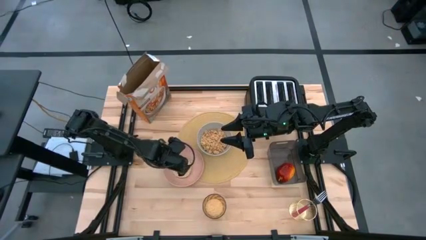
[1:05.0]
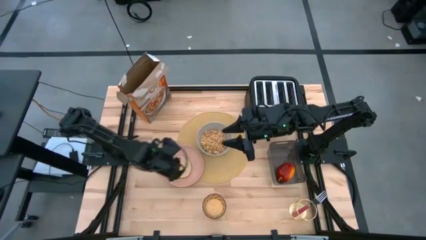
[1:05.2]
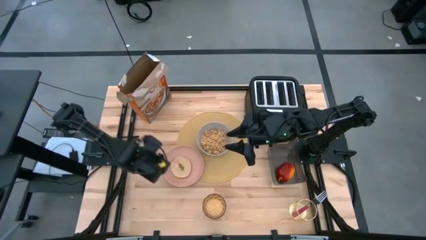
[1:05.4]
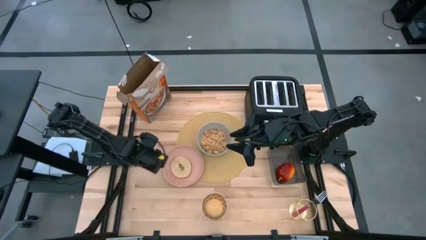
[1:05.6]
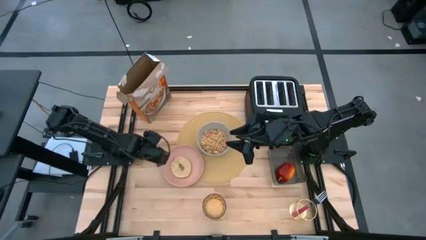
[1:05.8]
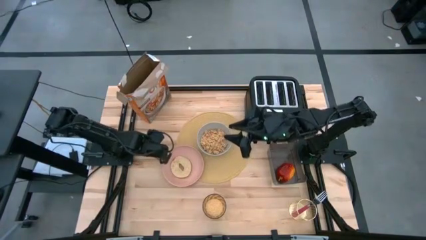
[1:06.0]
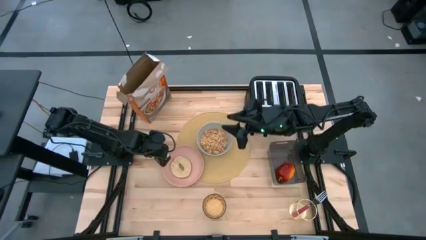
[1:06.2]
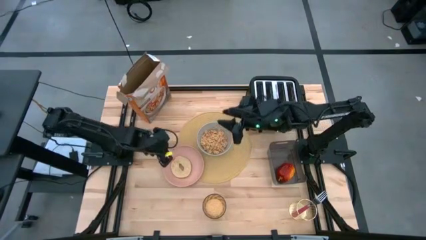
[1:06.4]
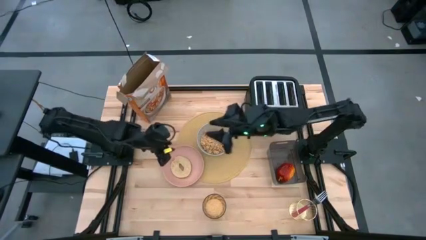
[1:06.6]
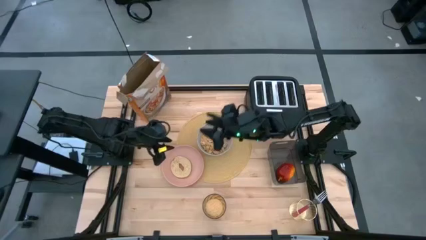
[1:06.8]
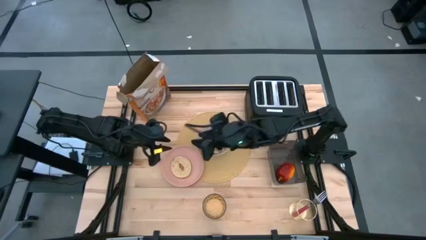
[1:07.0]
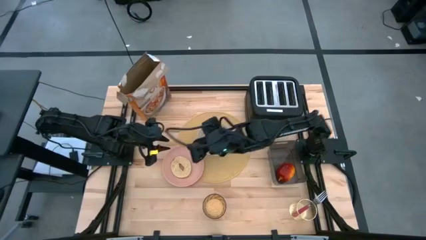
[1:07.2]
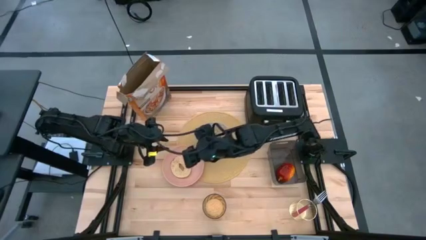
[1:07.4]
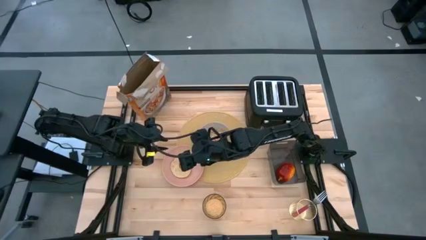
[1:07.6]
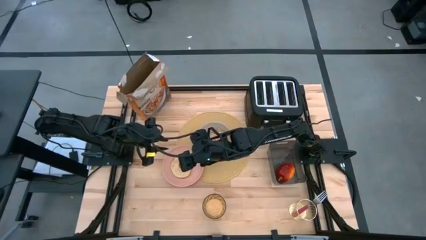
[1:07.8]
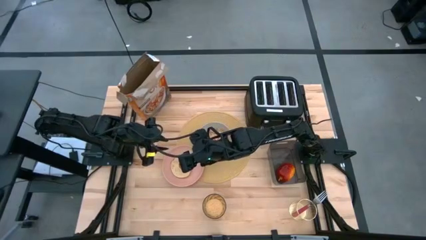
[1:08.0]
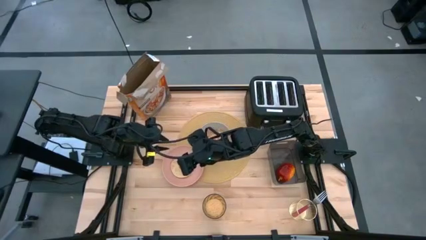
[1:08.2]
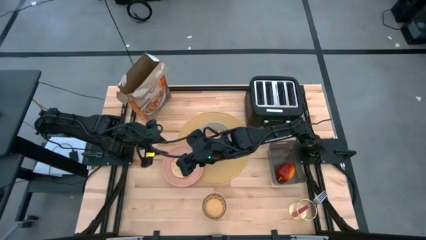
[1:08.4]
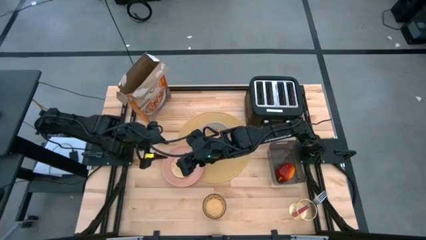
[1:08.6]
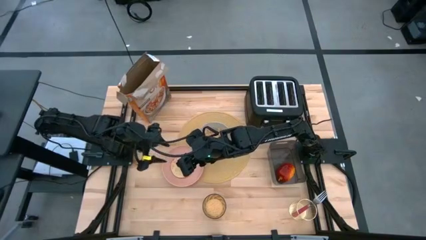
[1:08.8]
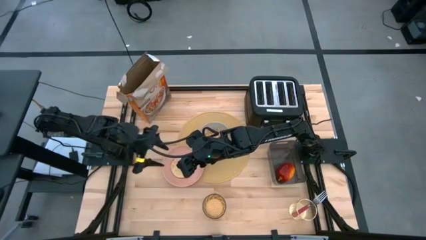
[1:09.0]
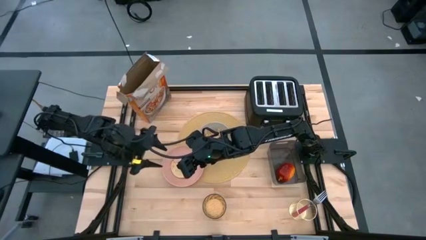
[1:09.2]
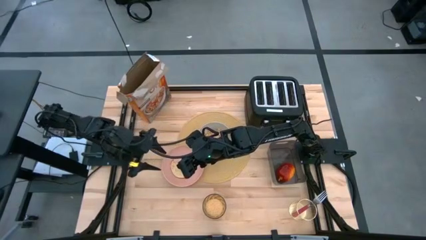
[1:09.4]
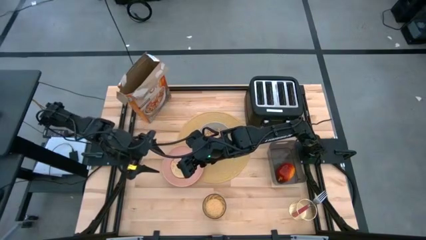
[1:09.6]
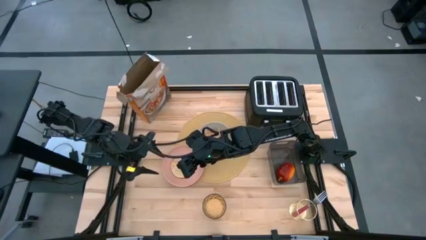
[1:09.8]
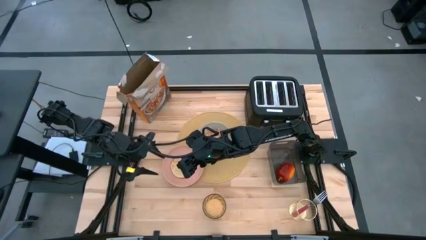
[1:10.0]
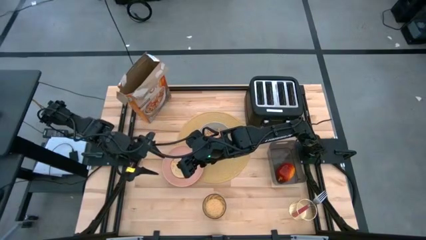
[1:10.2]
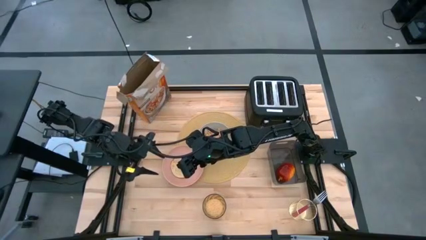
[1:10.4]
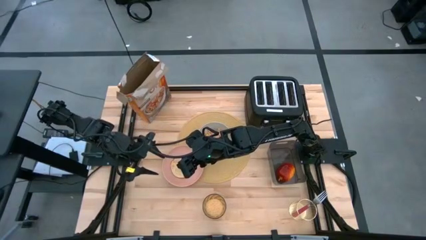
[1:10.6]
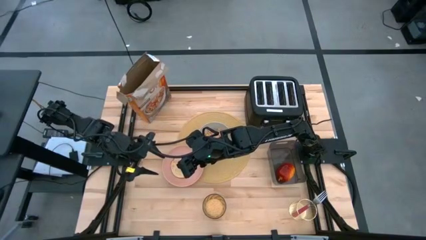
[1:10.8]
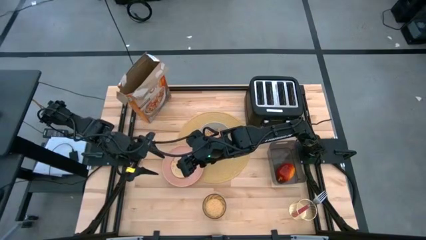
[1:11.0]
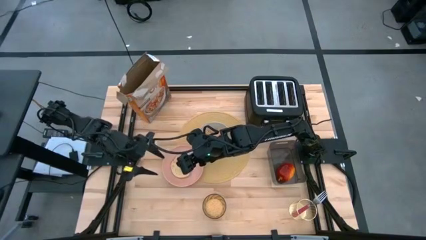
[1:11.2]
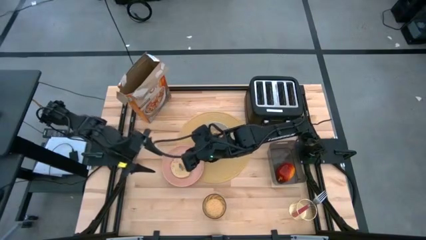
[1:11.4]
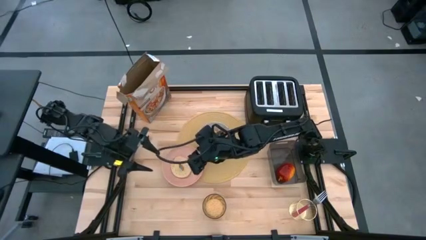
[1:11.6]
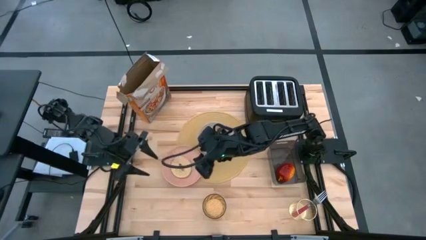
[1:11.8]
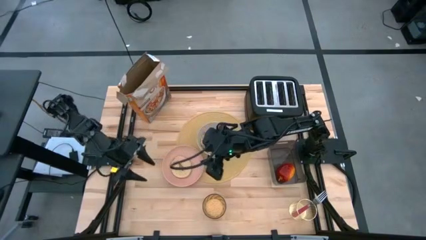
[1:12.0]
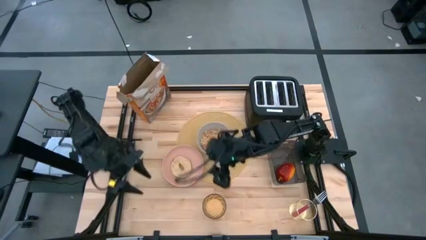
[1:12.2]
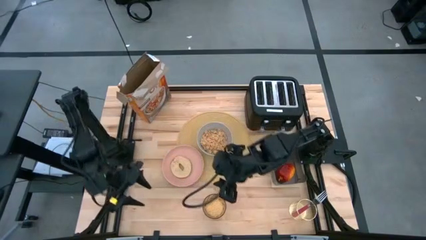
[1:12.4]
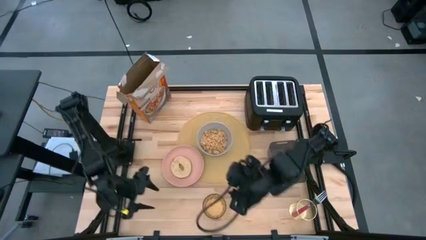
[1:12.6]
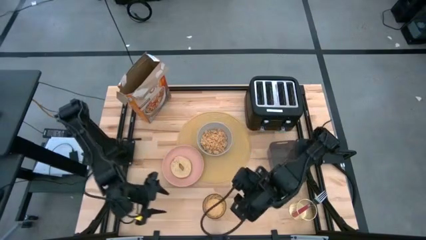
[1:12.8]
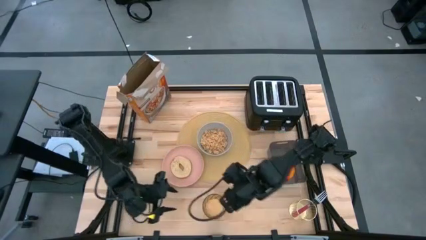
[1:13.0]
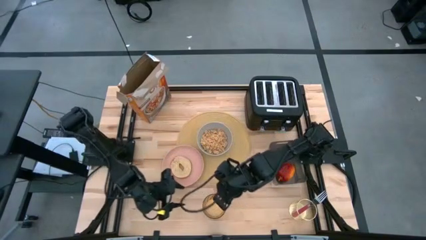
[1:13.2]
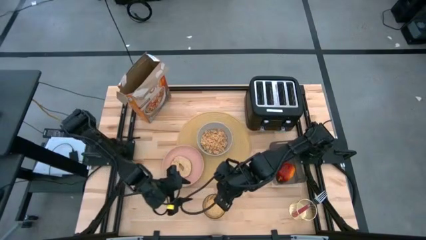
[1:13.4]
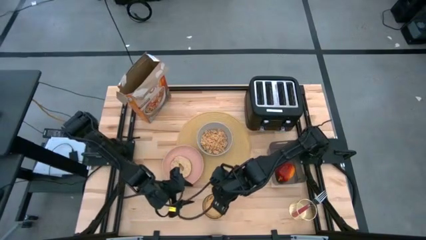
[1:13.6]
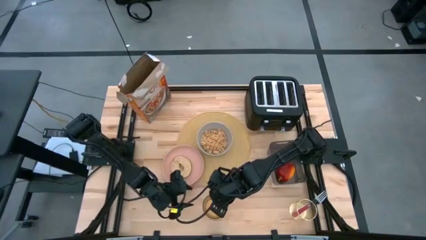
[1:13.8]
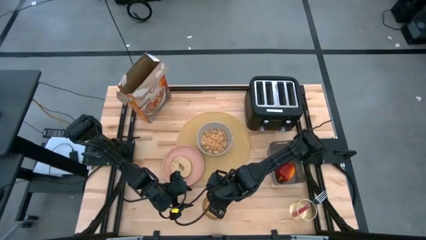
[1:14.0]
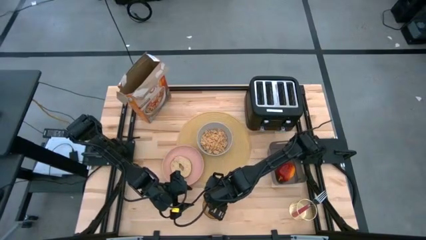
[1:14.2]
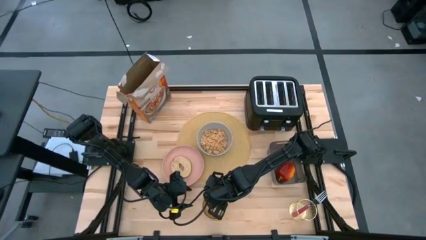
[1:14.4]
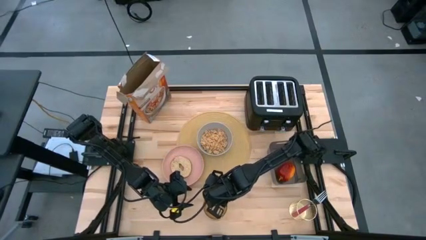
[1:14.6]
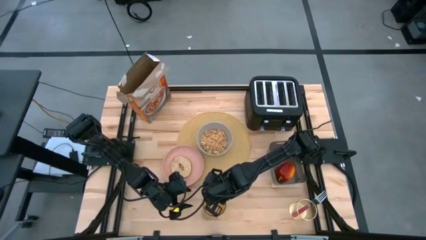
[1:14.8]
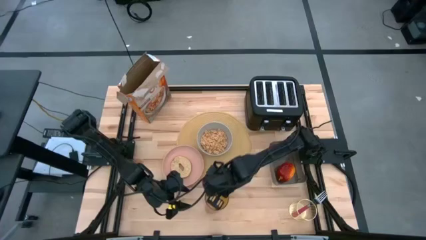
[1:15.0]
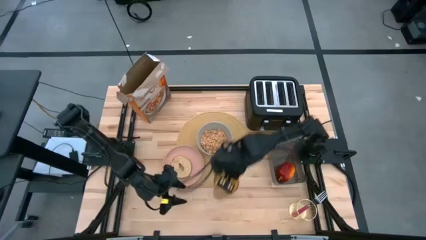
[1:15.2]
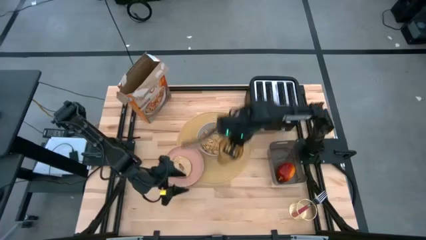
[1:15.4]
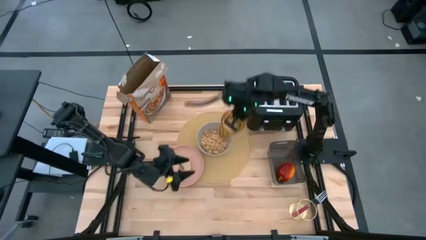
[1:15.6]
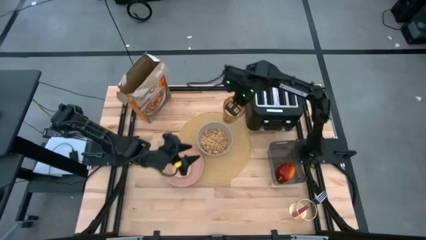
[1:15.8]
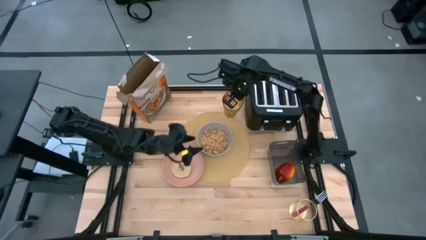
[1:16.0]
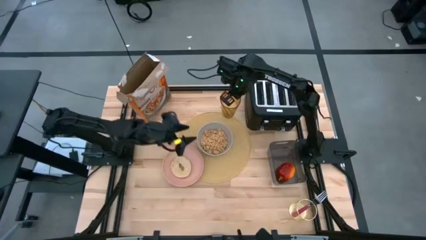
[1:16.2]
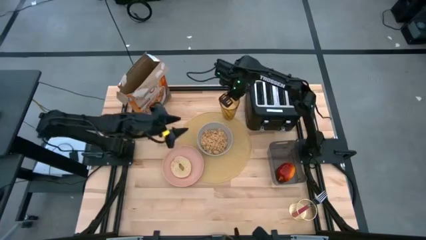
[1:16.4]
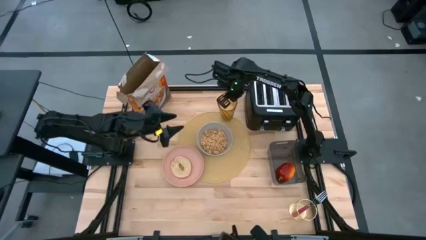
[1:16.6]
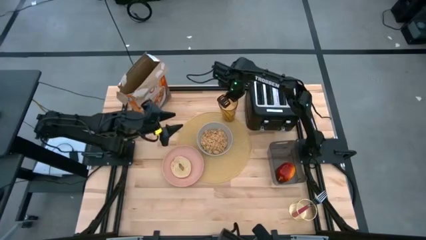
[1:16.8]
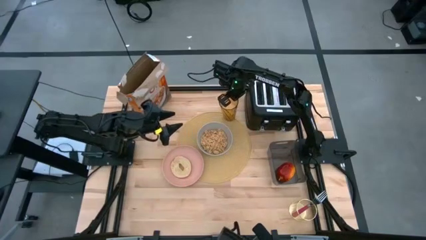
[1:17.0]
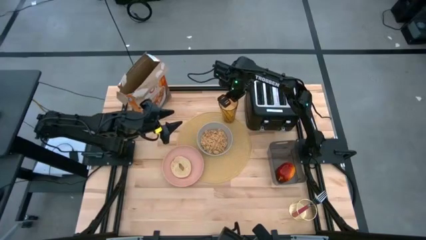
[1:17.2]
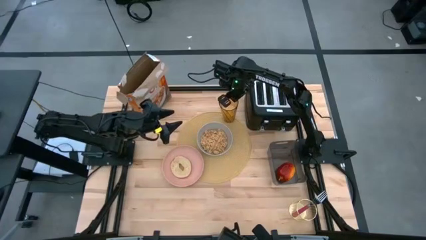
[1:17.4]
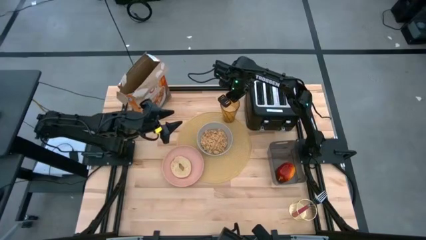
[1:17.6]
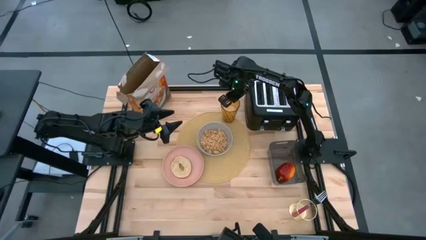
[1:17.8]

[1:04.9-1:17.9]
Task: Arrange a breakfast setting
Put the cup of milk on the brown place mat

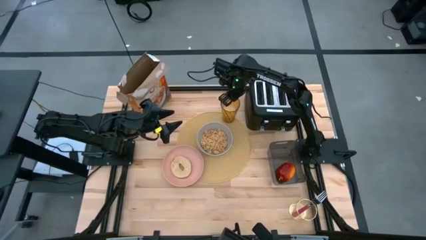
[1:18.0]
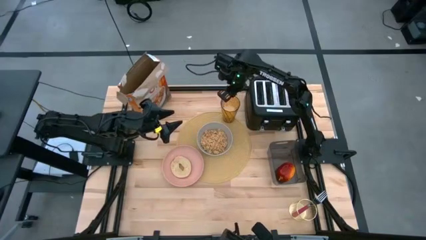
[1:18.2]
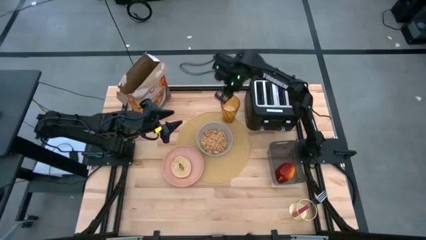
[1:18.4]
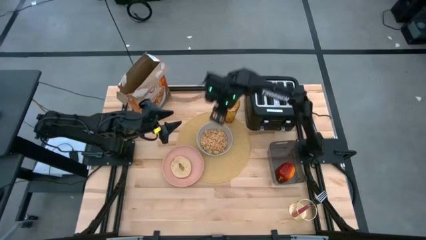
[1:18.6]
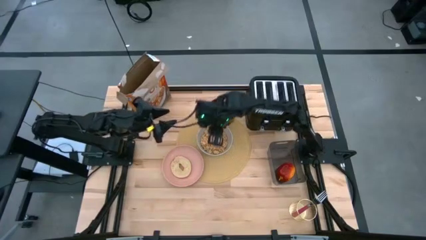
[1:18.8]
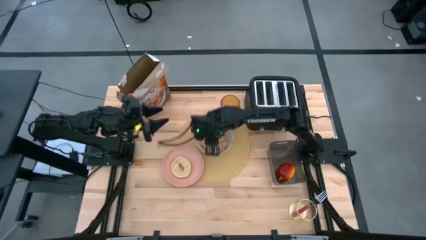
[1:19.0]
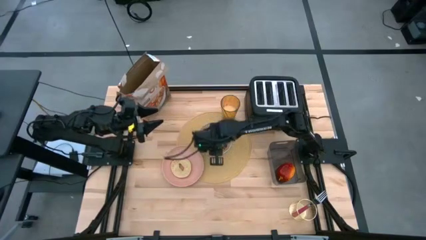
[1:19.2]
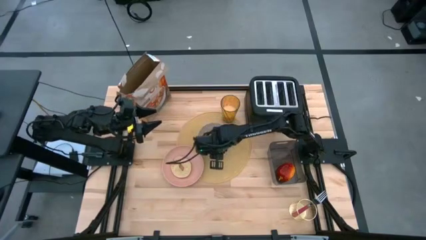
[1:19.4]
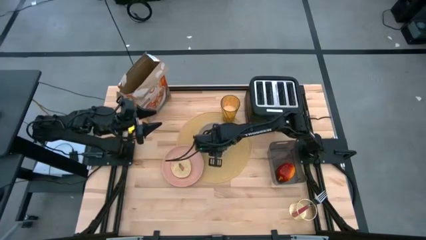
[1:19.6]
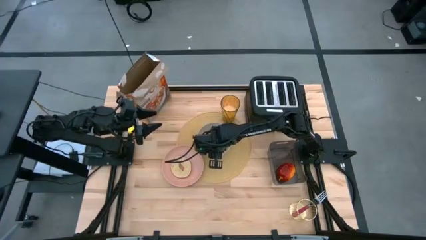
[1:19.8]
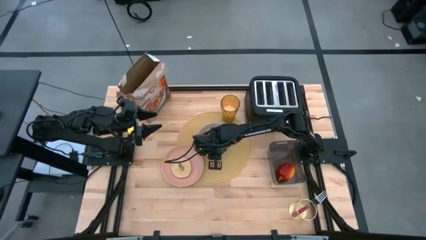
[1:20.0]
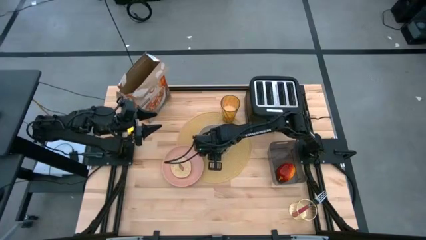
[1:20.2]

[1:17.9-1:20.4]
Adjust the gray bowl containing cereal

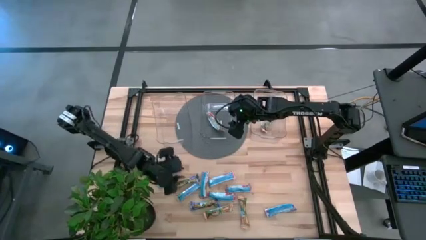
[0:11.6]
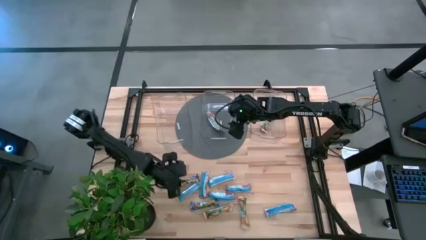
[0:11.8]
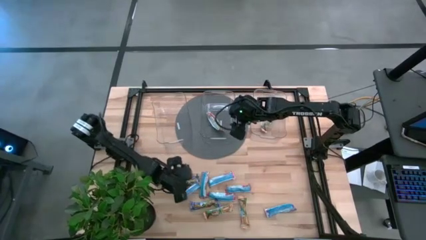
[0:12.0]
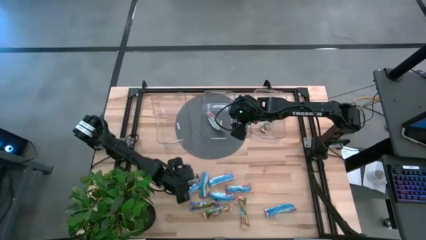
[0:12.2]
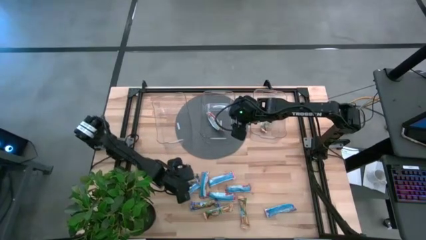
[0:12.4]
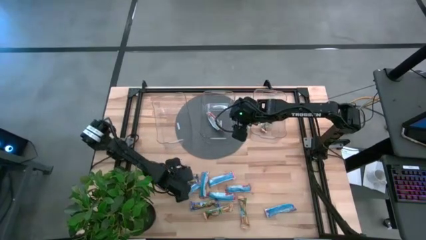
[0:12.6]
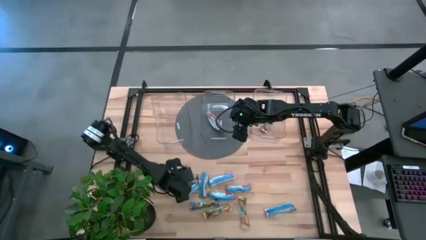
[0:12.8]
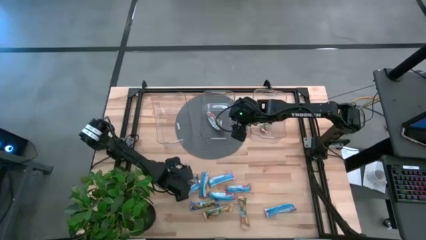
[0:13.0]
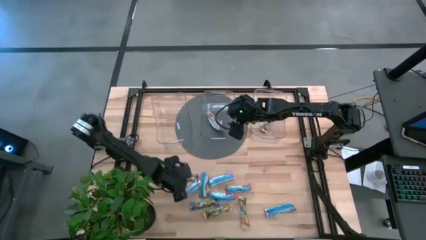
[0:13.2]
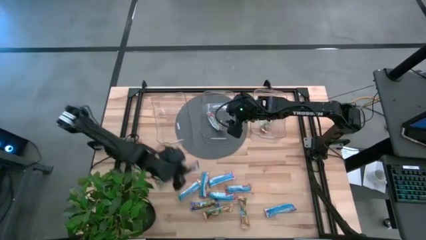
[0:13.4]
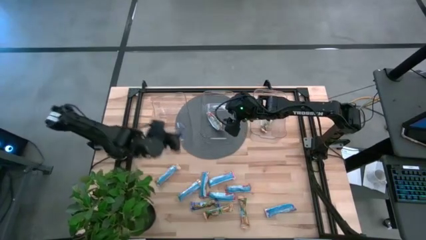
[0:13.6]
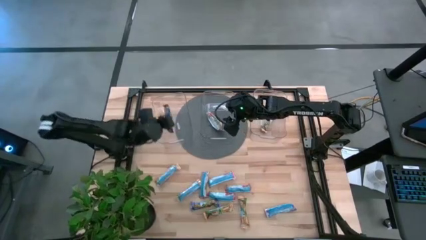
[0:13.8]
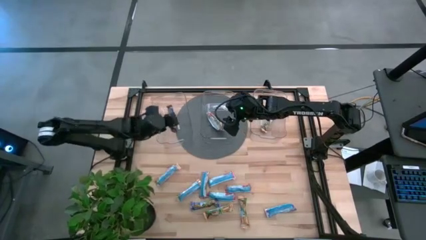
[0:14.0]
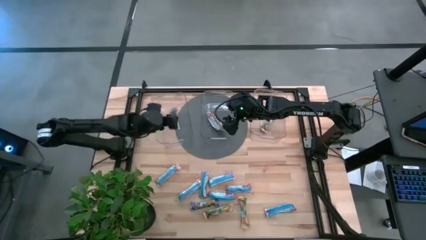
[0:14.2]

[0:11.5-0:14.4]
Task: Pick and place Granola Bars by type
Put the blue granola bar into the left transparent bin
